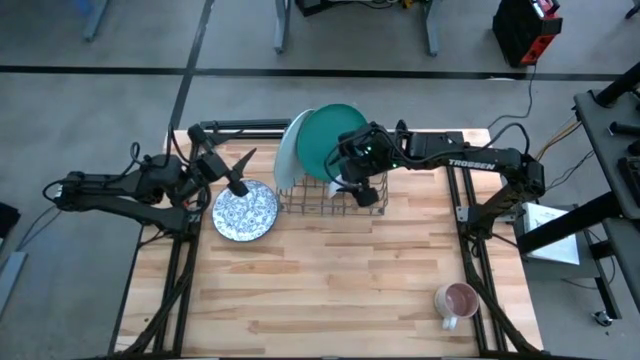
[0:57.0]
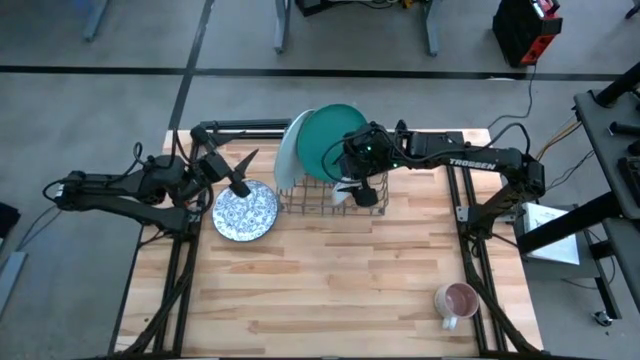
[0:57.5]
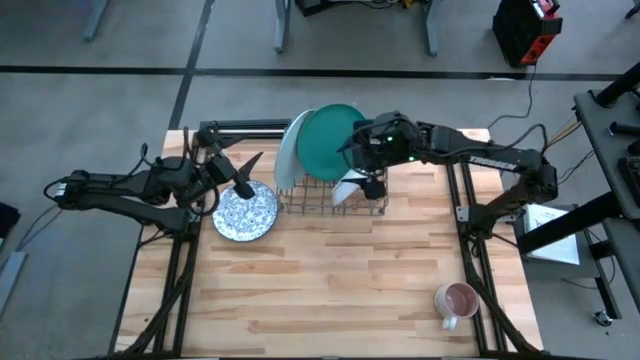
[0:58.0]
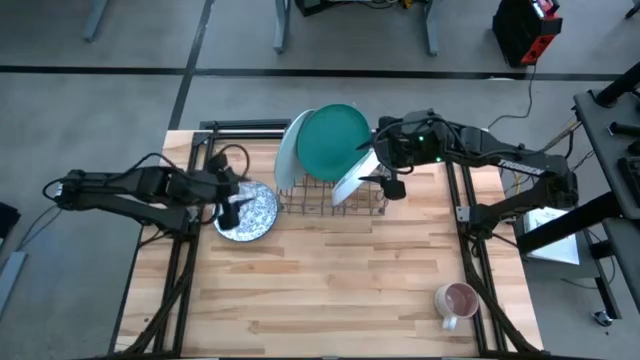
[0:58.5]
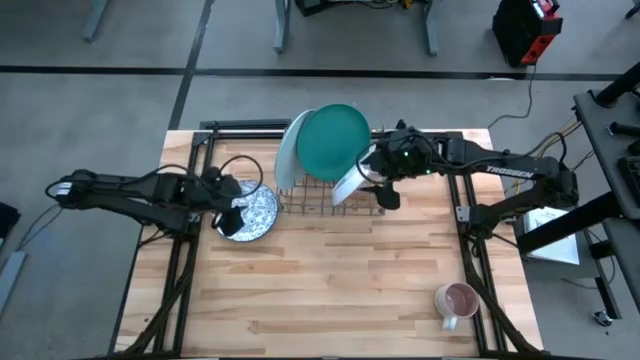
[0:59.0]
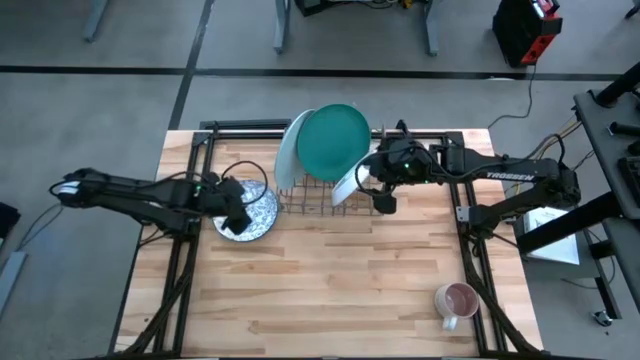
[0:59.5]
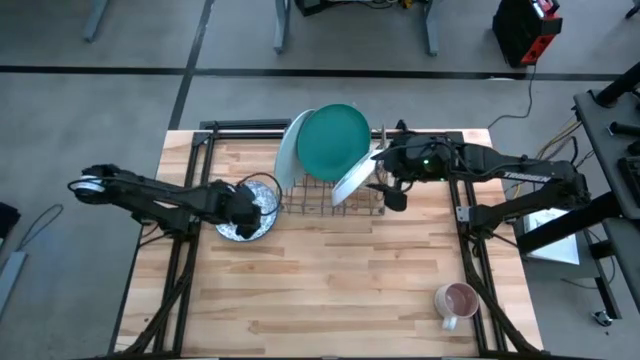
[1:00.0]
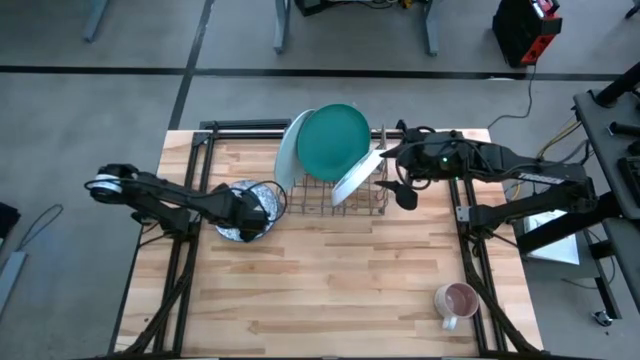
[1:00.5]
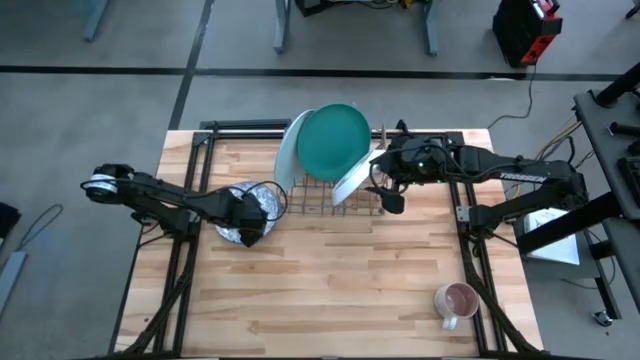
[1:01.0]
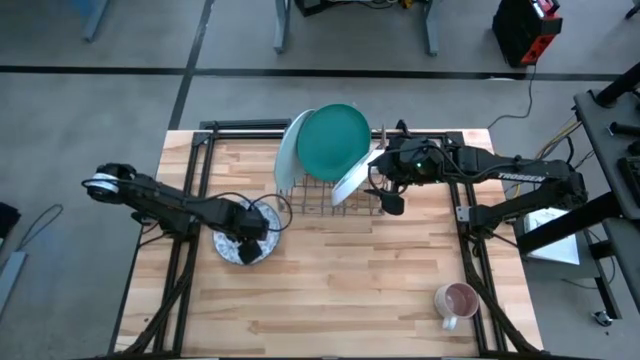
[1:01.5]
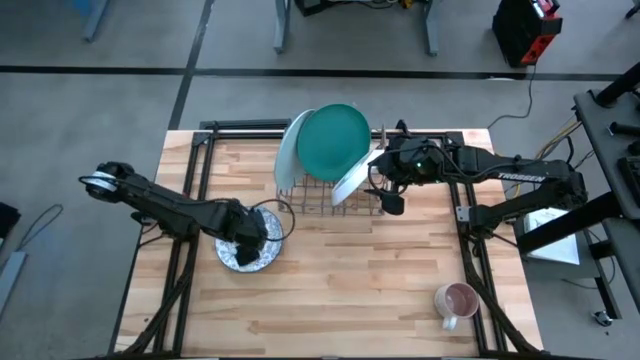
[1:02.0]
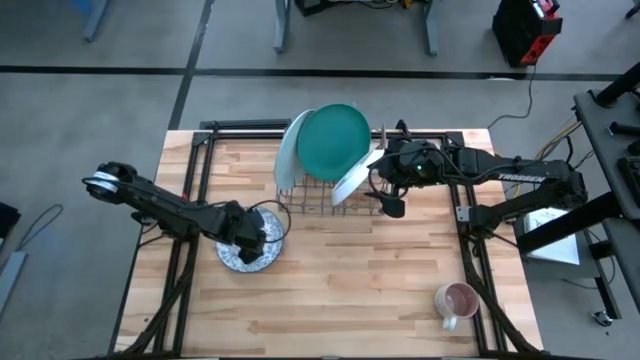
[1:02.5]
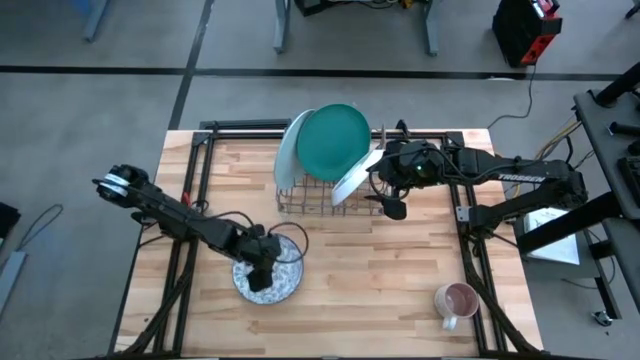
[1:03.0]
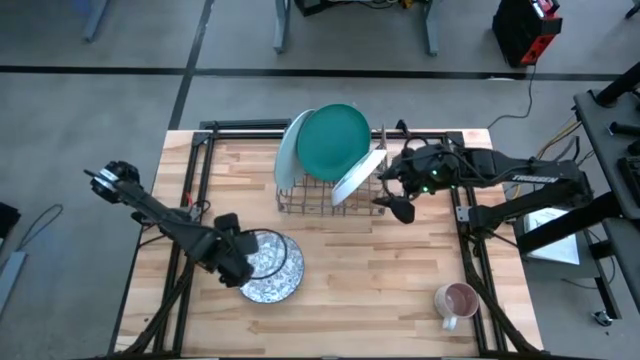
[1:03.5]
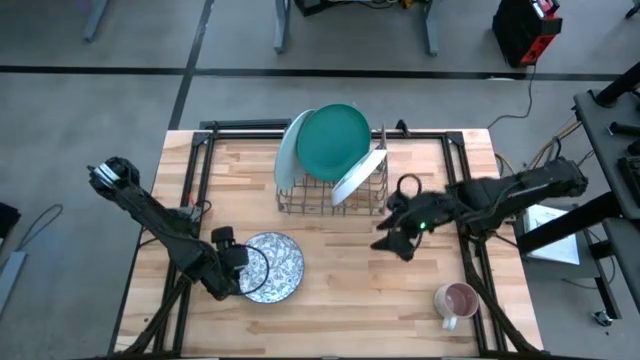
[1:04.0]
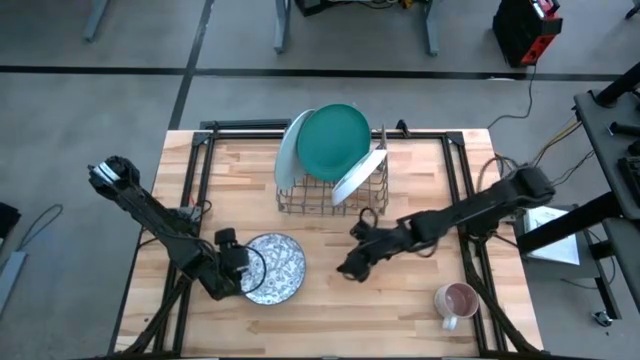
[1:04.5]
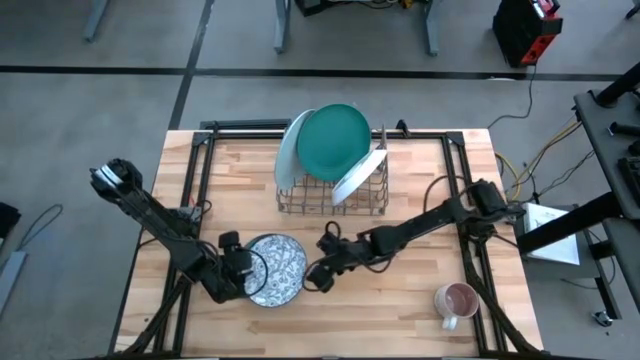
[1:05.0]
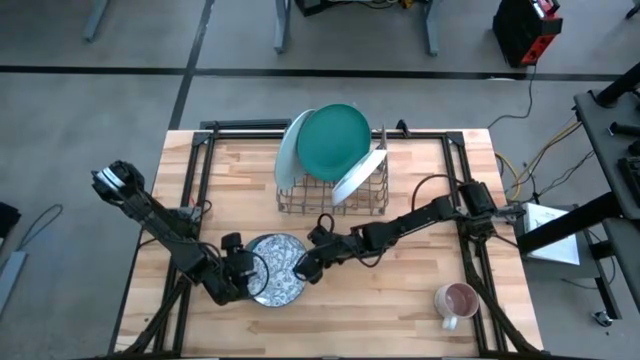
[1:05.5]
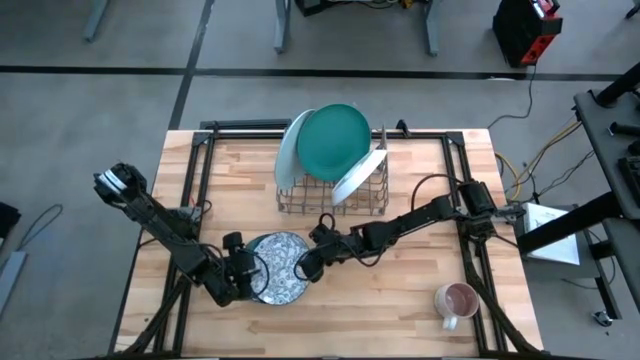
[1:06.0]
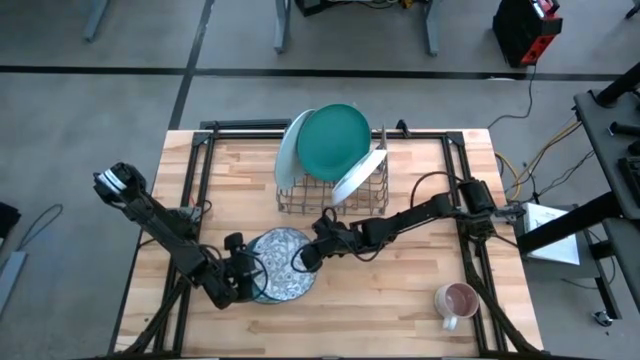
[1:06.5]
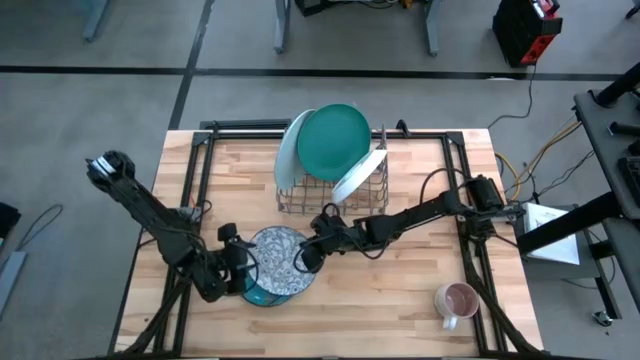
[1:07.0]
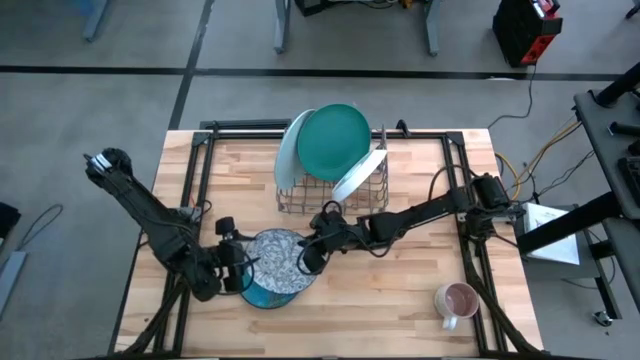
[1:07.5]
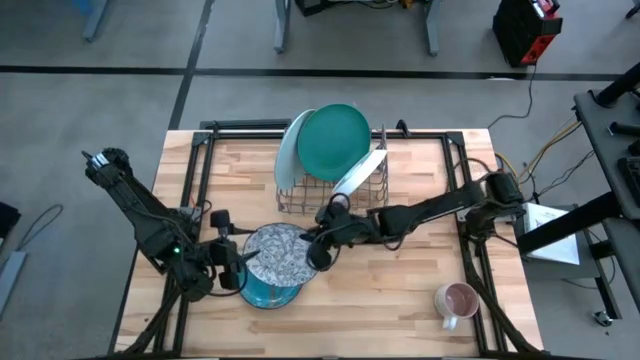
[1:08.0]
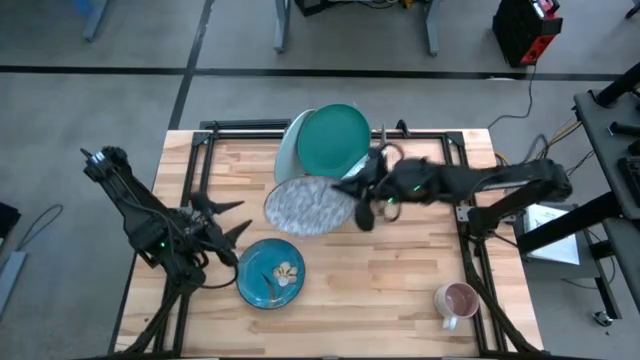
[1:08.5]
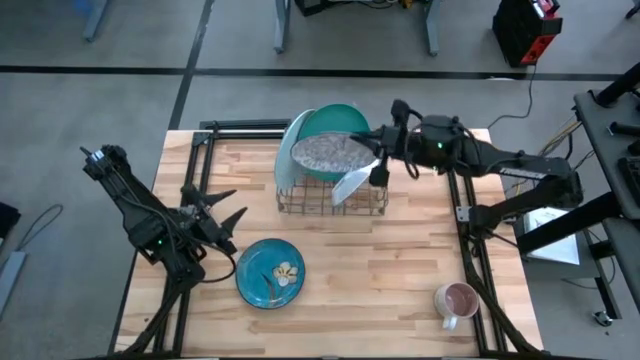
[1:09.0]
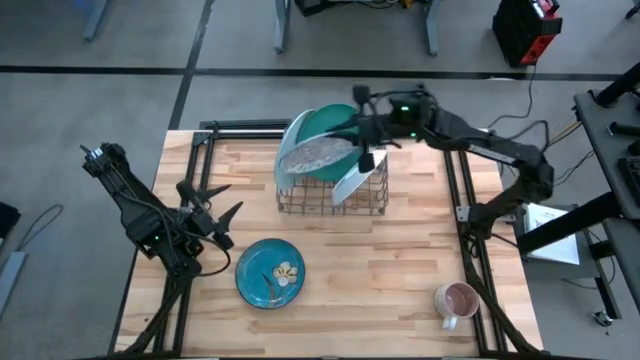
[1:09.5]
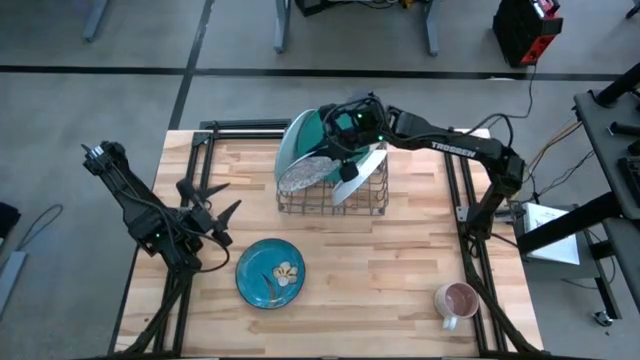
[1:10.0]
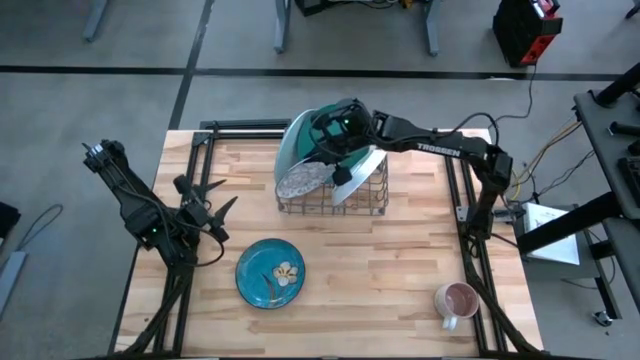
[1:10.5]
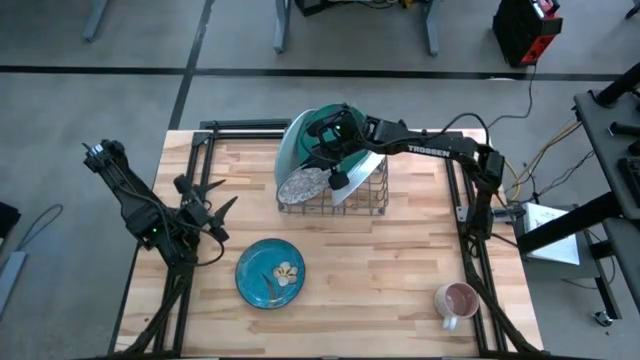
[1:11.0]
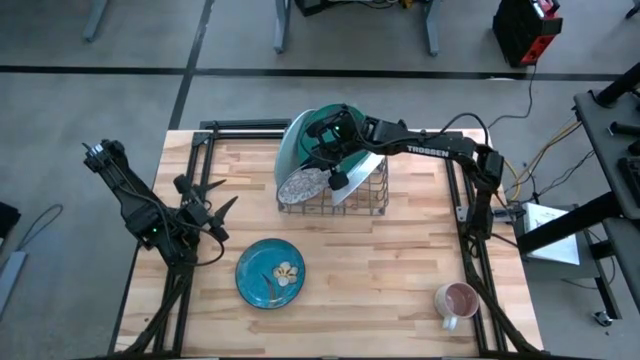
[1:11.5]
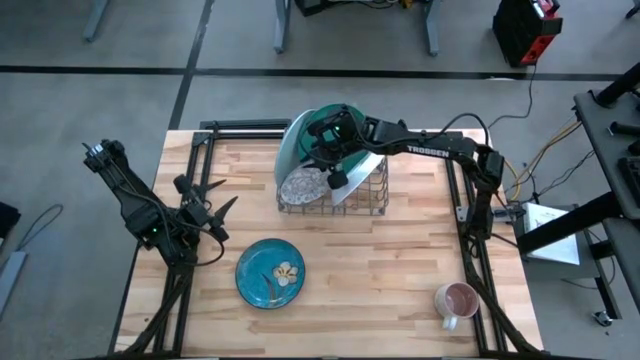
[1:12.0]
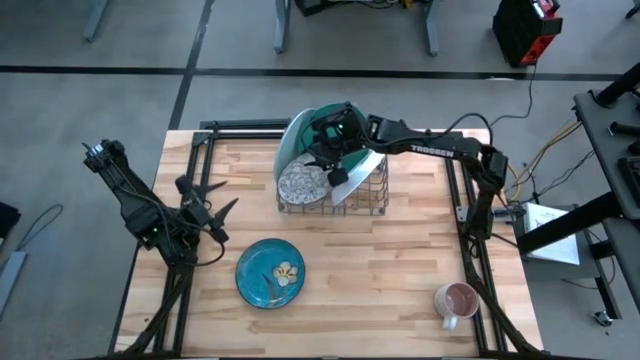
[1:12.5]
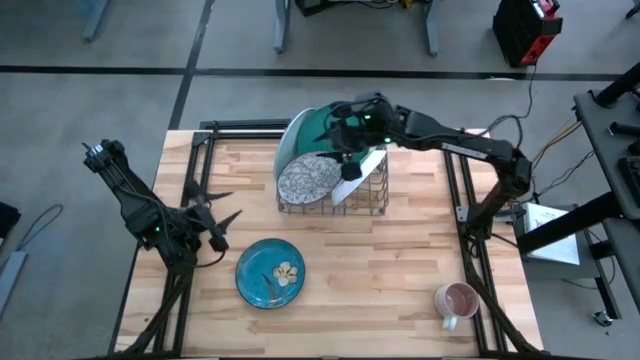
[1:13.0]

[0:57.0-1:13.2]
Task: Sort dishes
Put the white patterned plate into the dish rack

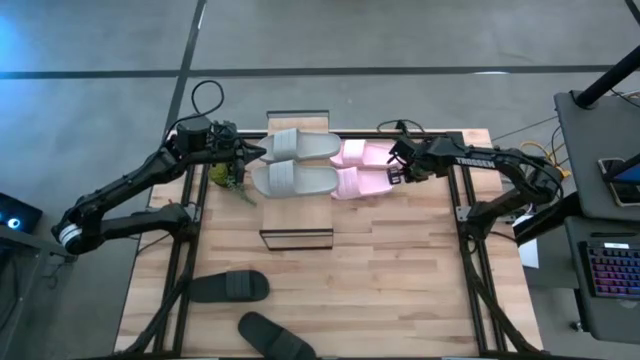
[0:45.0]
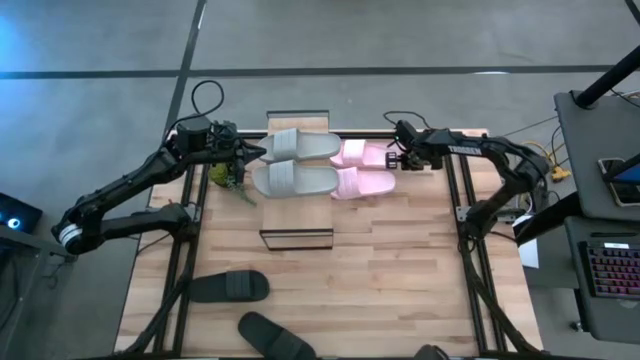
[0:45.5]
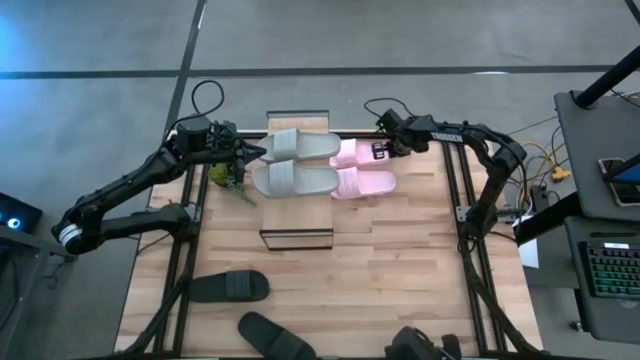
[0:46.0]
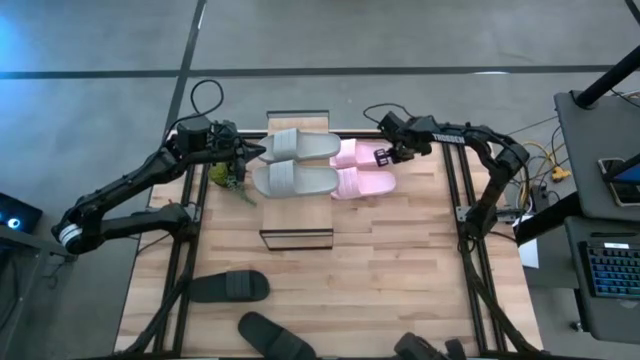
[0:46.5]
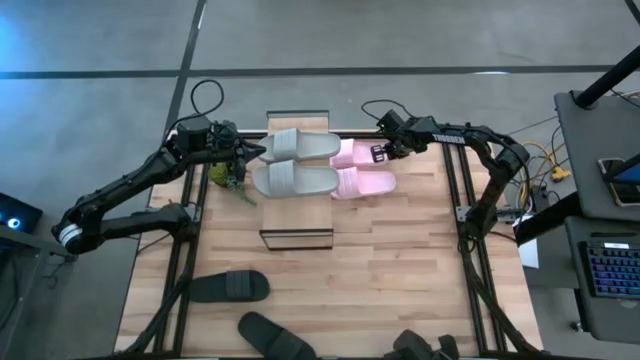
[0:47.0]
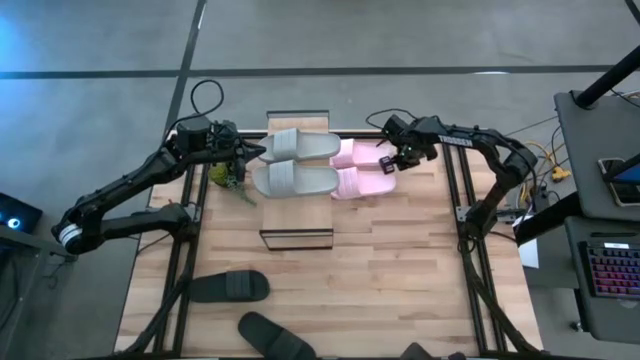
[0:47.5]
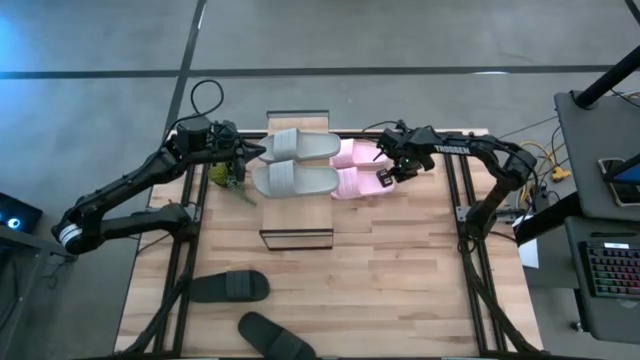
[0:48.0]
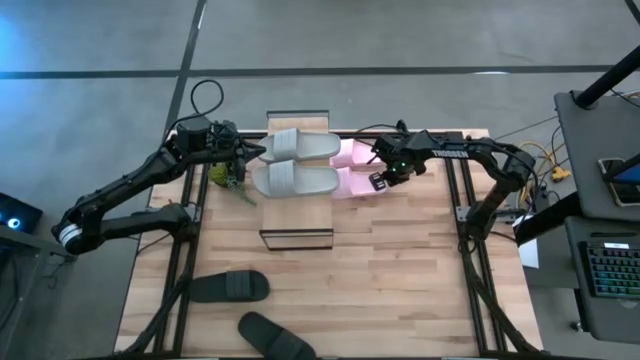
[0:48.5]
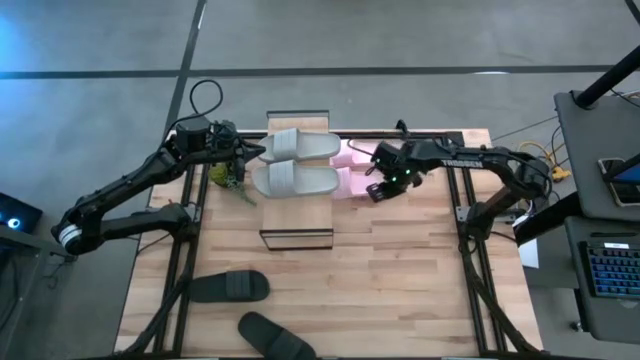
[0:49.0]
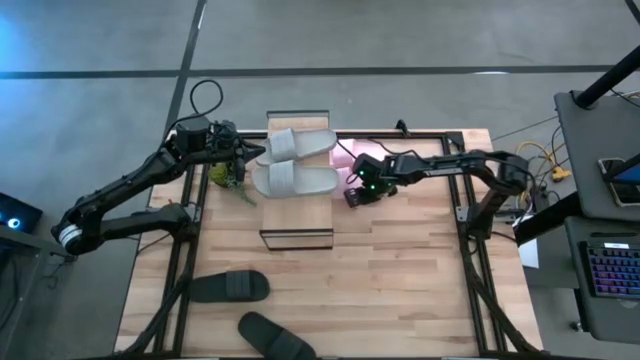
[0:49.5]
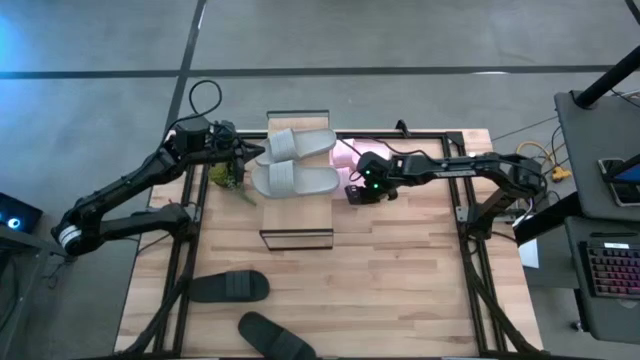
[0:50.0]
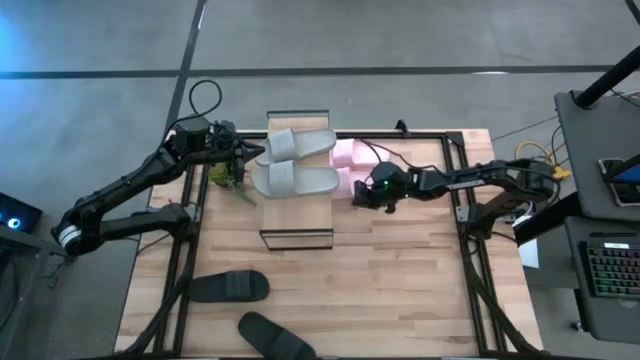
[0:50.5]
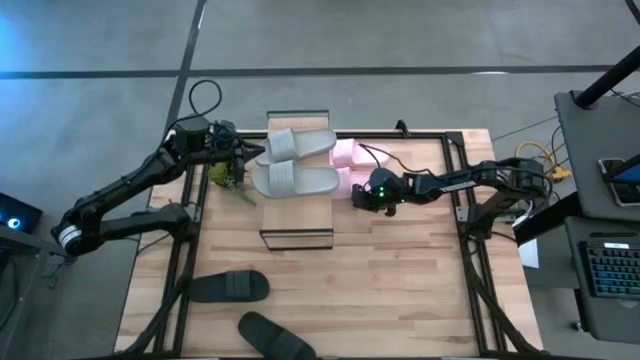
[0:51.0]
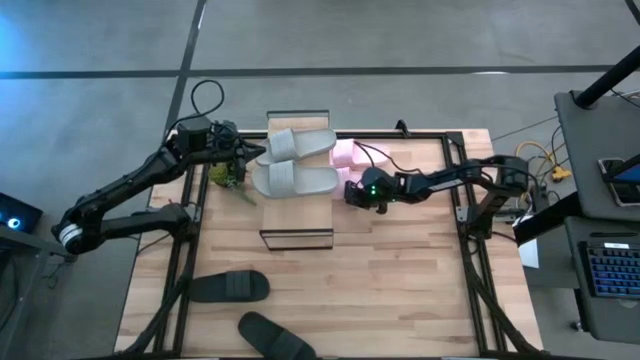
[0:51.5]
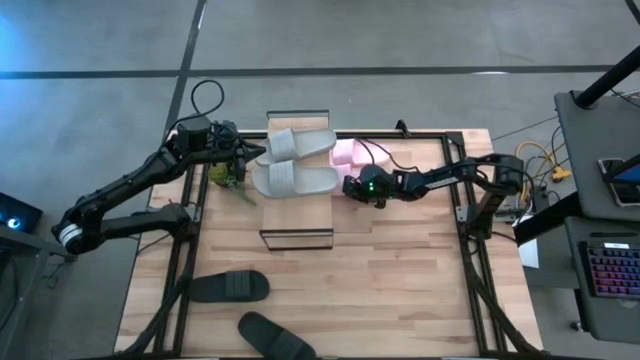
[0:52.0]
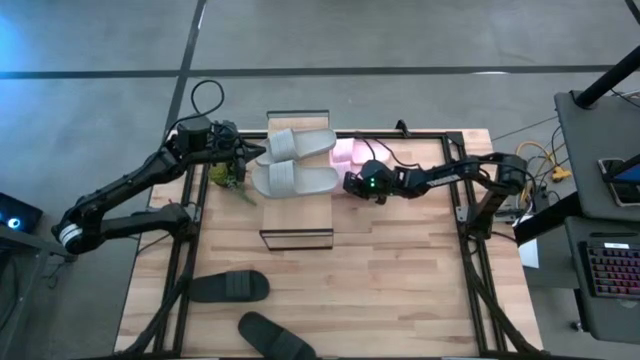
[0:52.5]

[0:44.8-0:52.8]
Task: Pick and place slides into the shelf
Adjust the pink slides on the table
